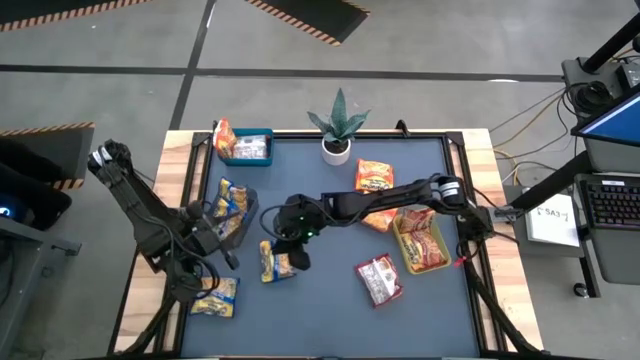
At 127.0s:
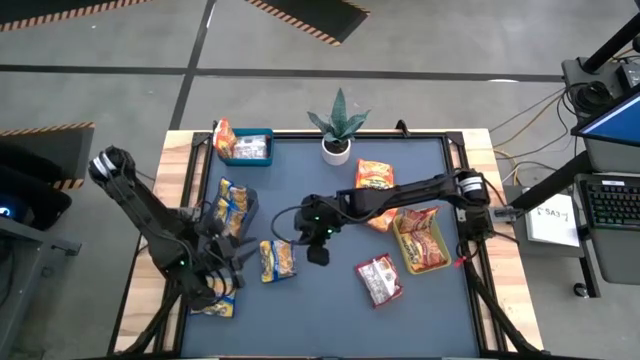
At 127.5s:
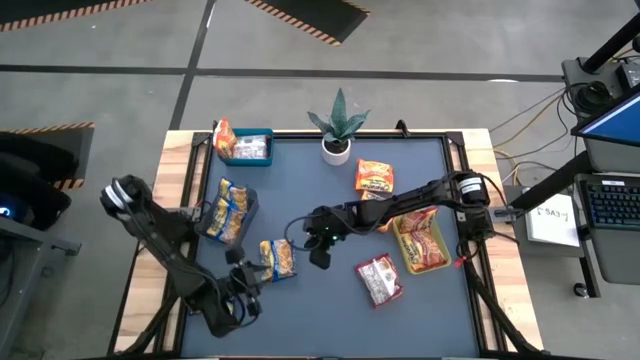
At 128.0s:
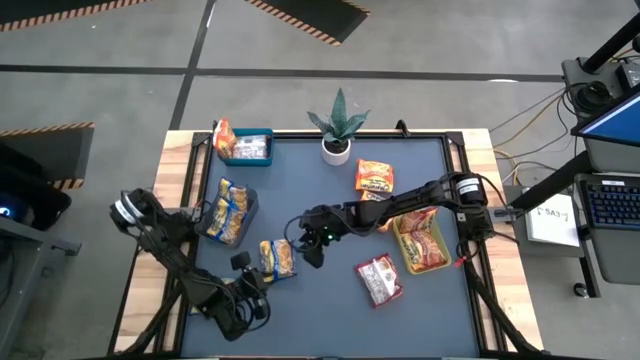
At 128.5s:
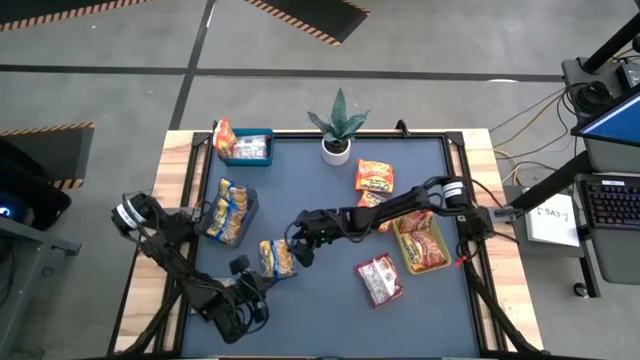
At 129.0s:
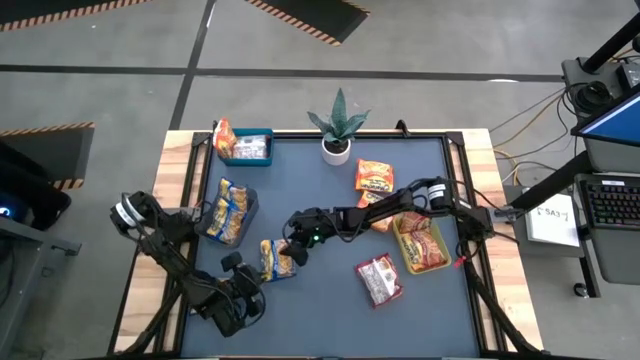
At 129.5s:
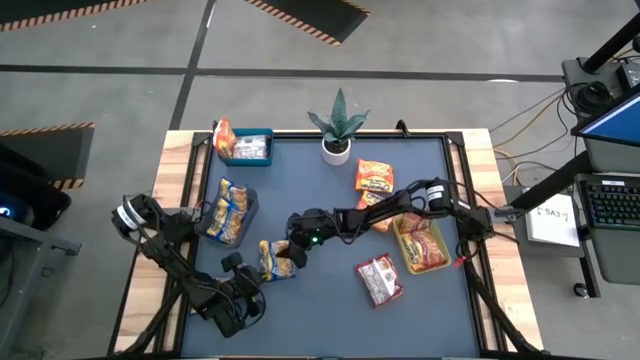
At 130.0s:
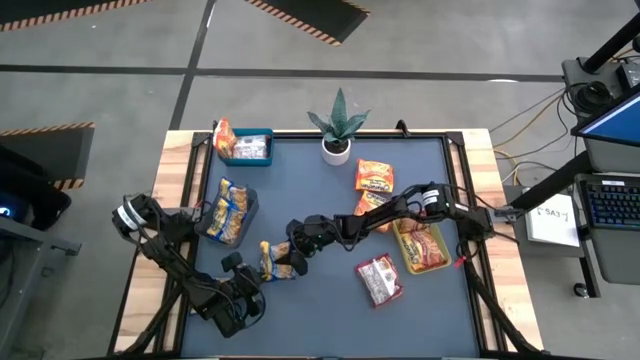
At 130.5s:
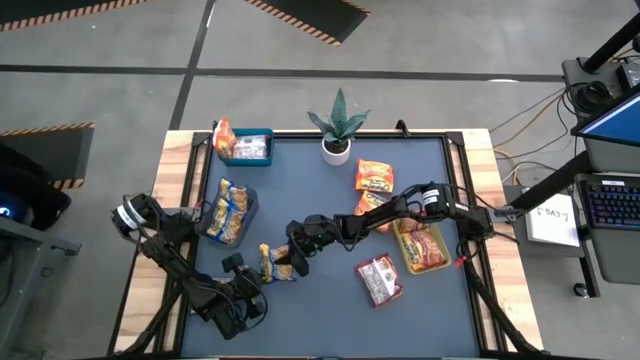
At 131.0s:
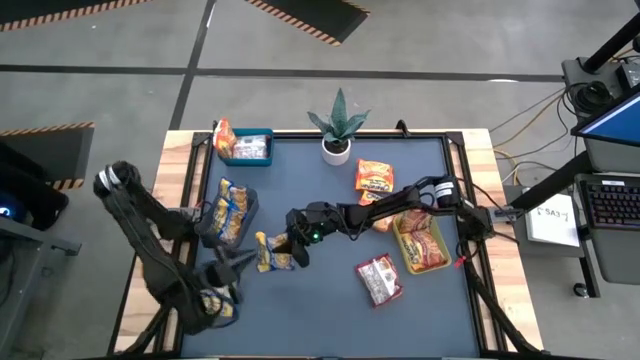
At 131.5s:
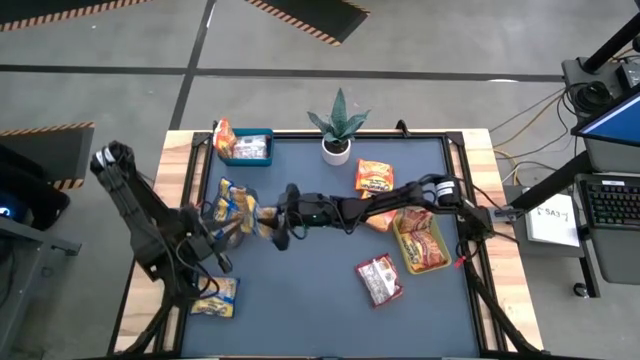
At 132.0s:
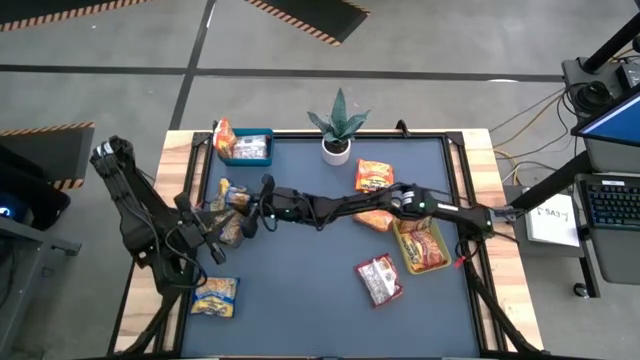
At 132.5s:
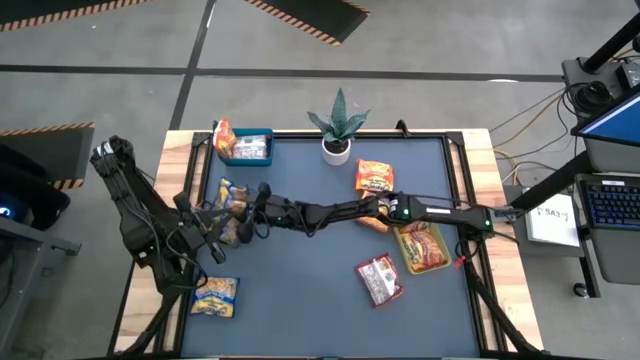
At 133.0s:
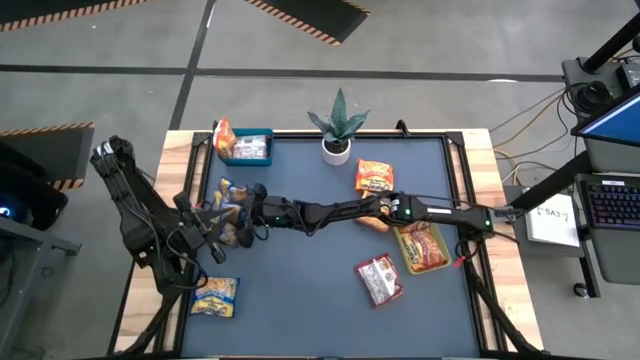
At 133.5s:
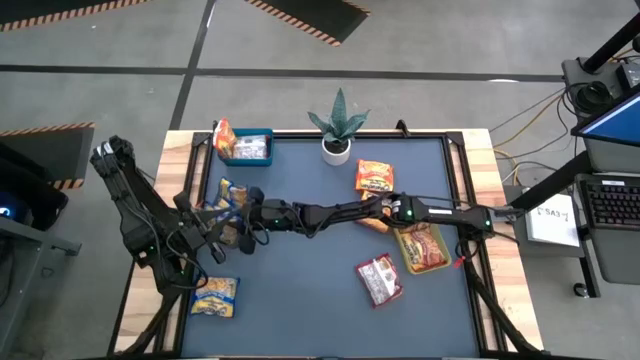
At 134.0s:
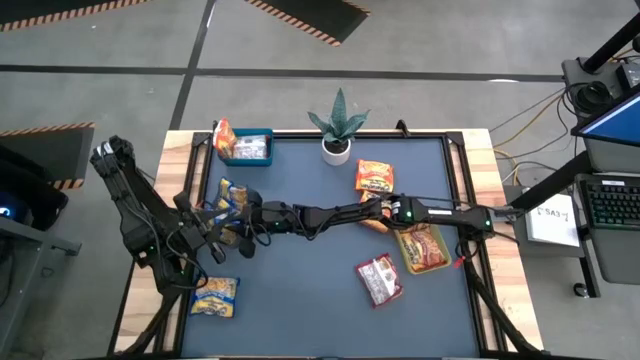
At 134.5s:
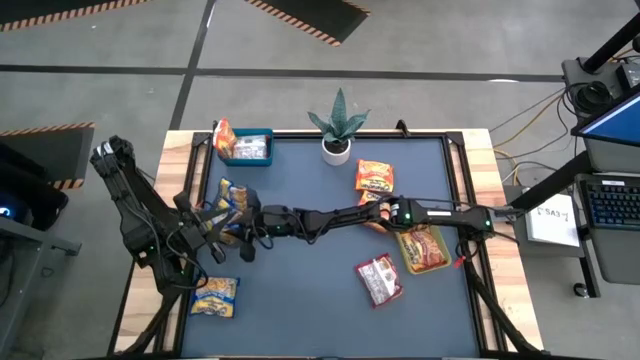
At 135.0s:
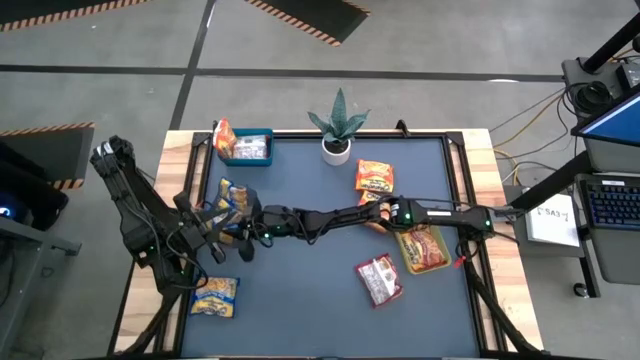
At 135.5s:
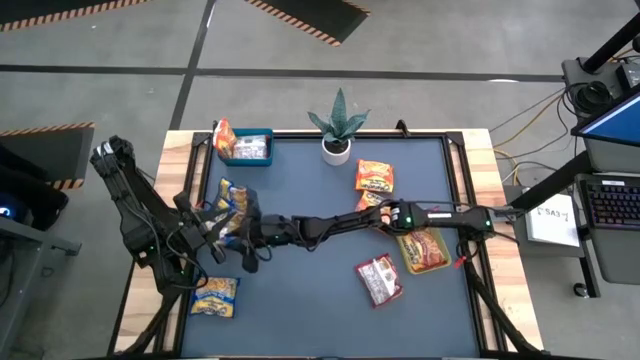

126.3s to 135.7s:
Task: Sort Maruchan noodles
Put the blue noodle pack into the black bin

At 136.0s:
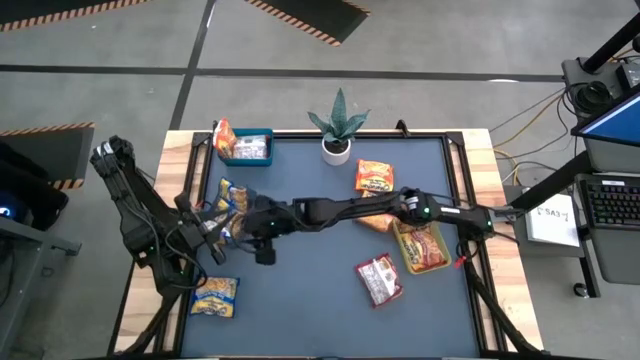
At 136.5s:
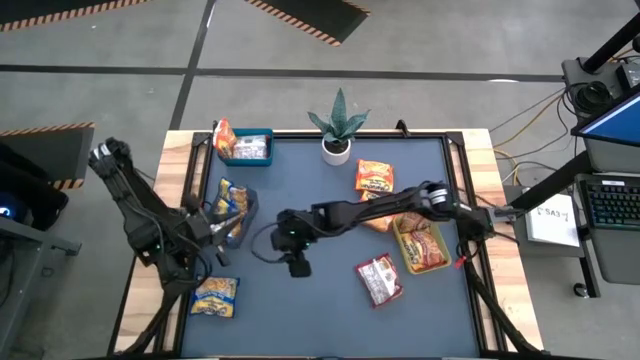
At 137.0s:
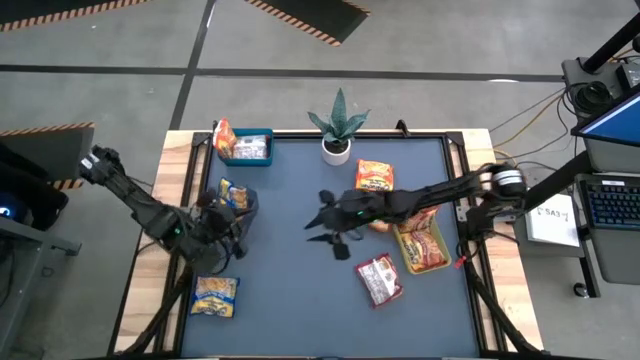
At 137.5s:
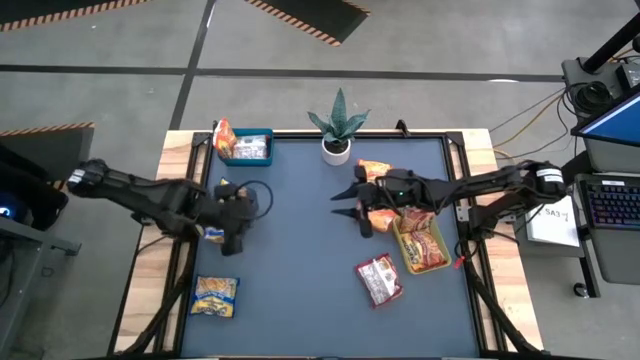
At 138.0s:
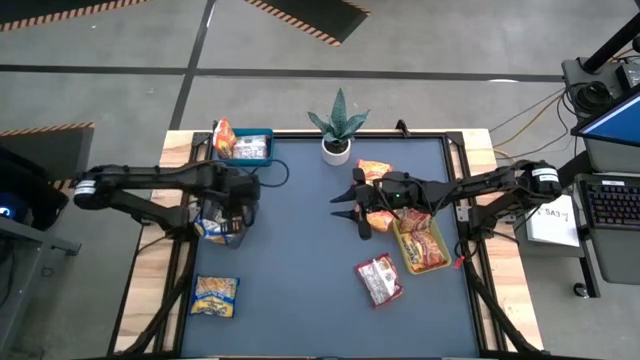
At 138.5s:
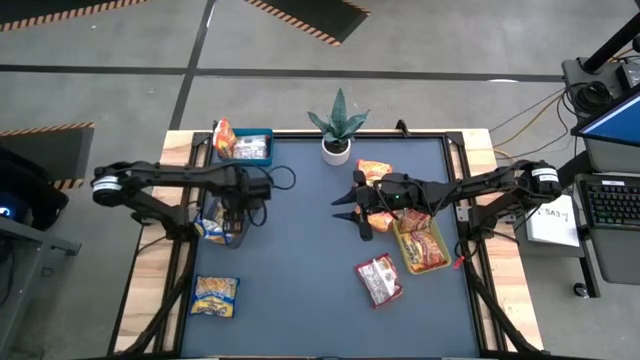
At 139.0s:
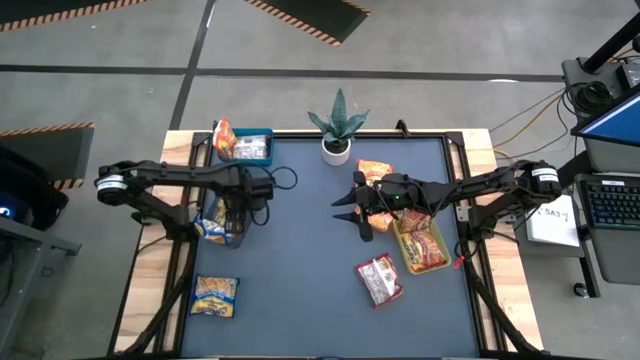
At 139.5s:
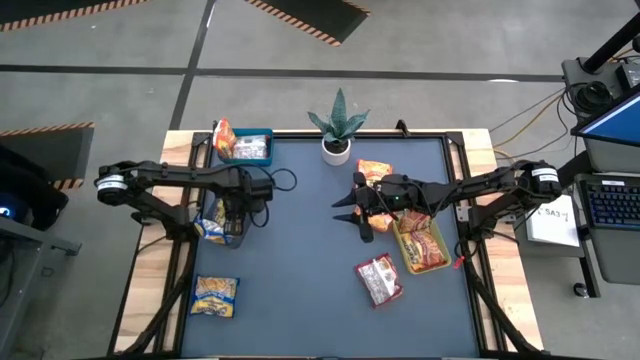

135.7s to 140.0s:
Adjust the blue noodle pack in the bin

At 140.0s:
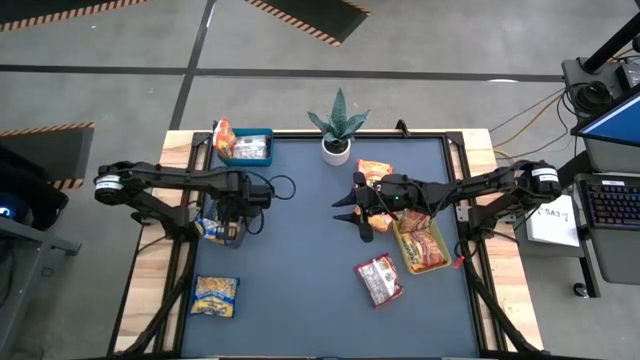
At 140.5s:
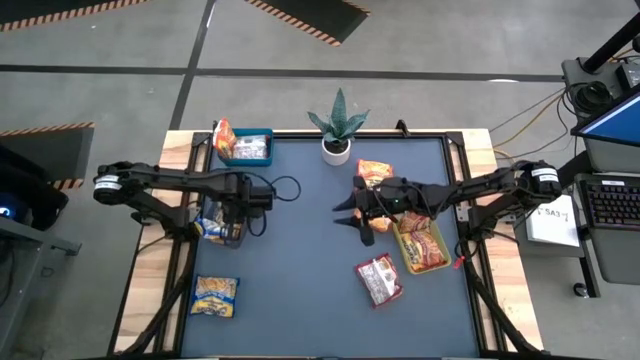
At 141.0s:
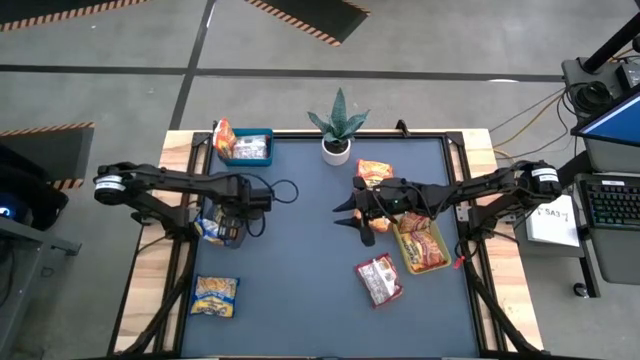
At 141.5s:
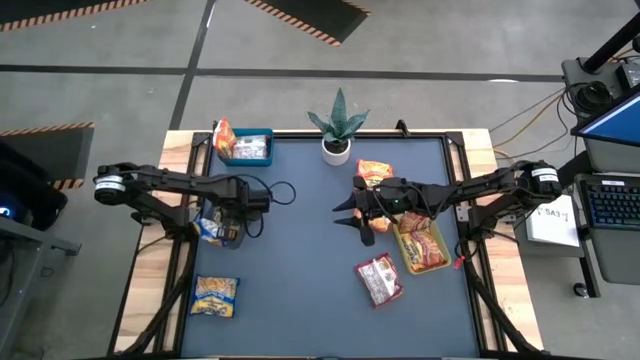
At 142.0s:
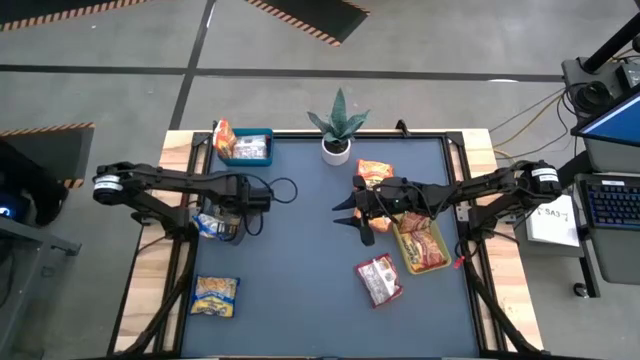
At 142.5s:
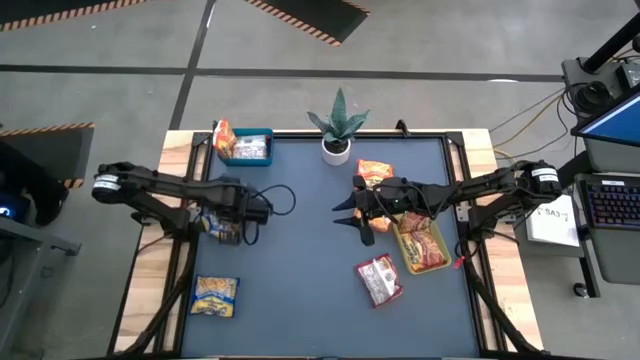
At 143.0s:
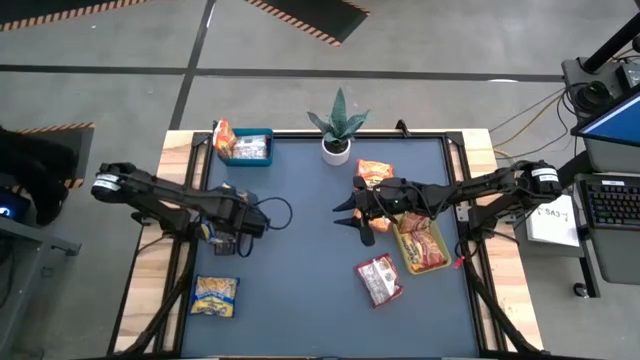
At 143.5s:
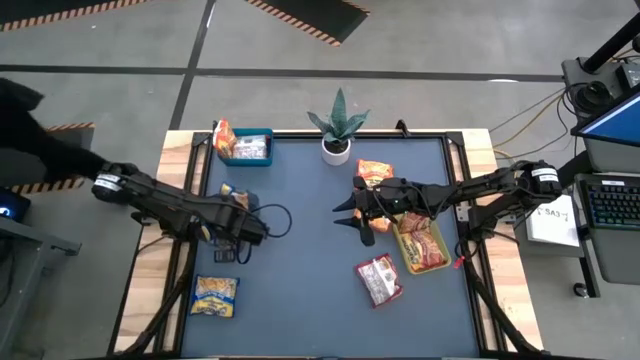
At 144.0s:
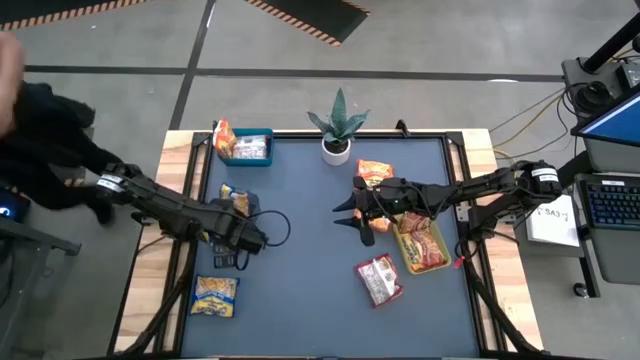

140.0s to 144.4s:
Adjust the blue noodle pack in the bin

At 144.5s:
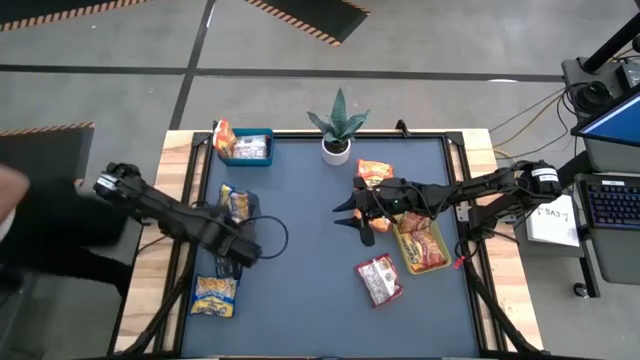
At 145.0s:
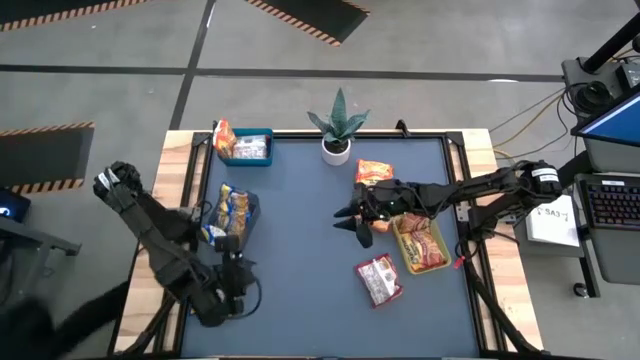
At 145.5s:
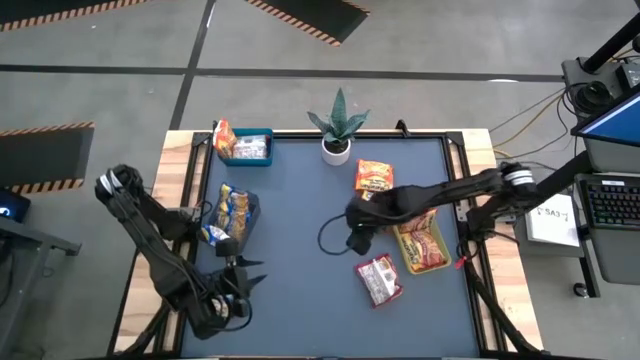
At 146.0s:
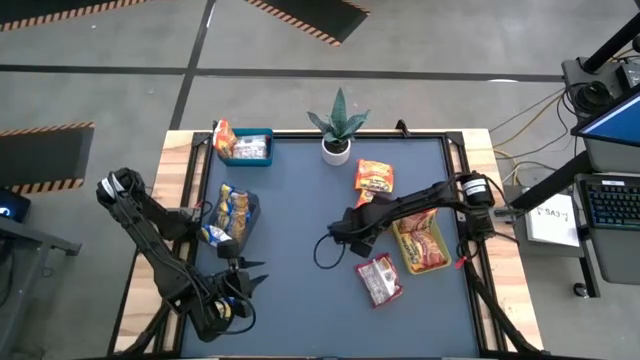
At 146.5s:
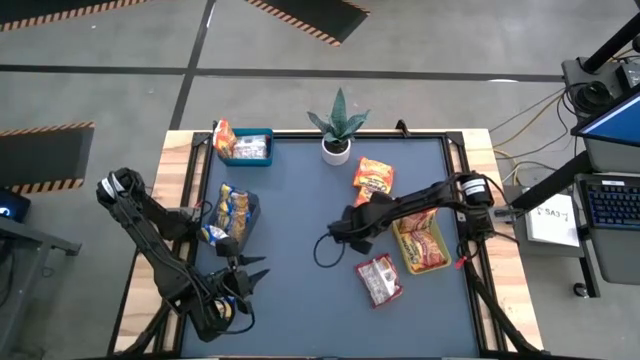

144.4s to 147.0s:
Put the orange noodle pack into the blue bin

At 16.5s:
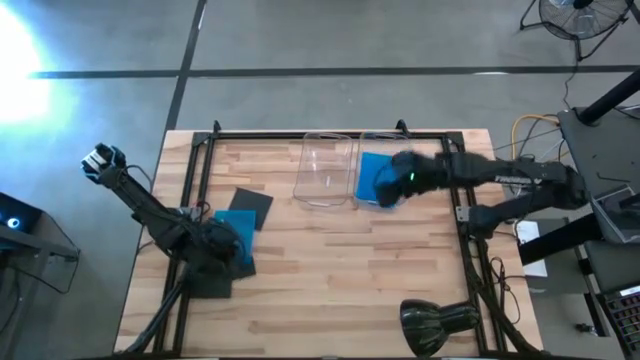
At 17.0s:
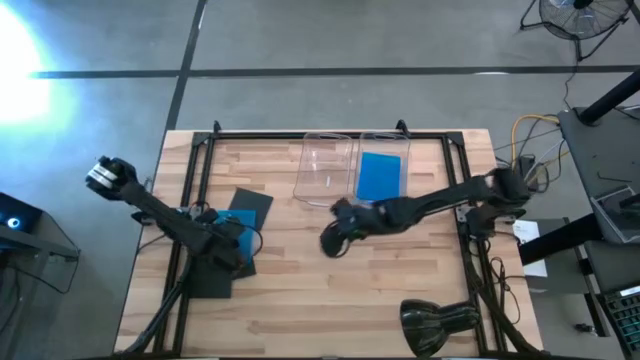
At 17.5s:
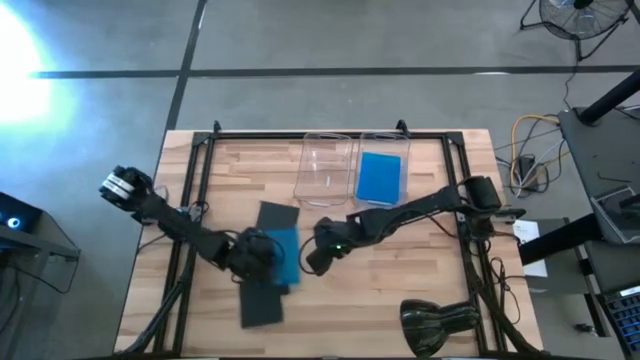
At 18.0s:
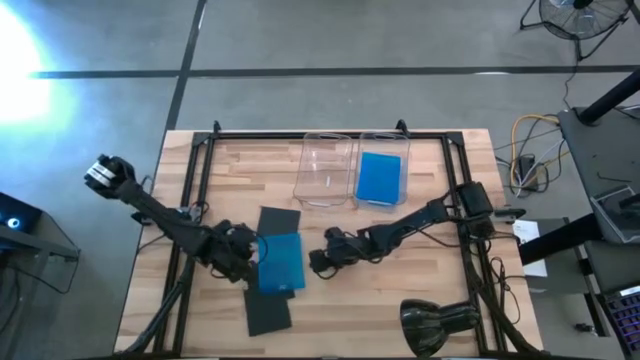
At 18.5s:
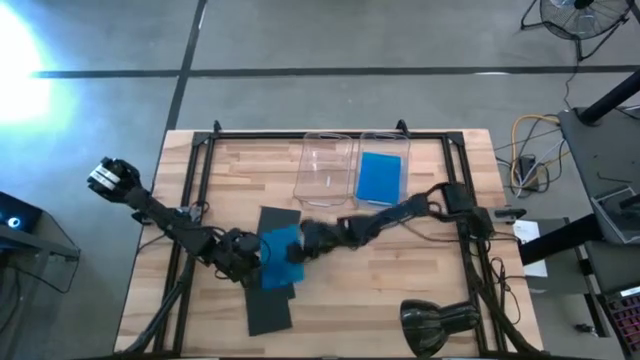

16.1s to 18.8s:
Task: Pick & place jewel cases by type
Put the blue CD case into the right transparent bin
